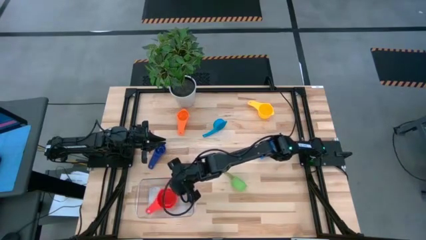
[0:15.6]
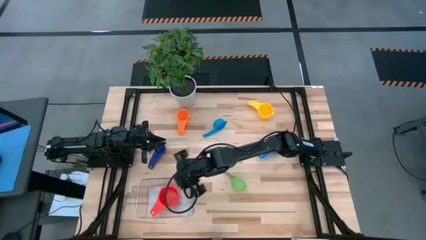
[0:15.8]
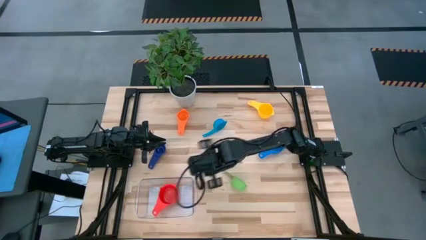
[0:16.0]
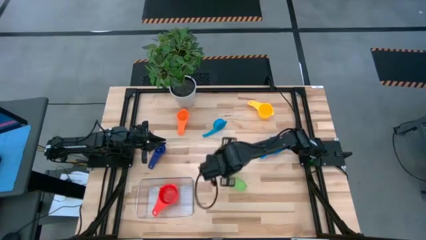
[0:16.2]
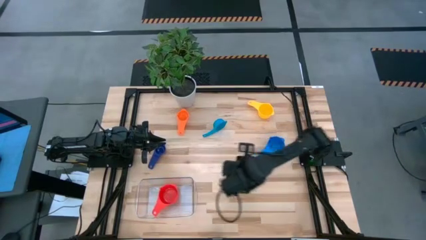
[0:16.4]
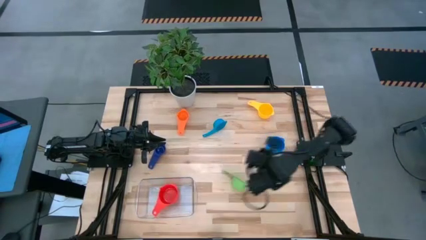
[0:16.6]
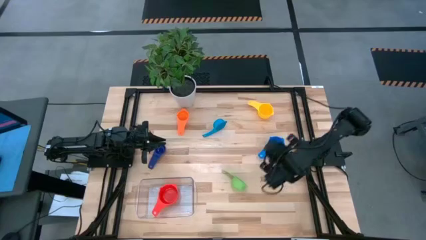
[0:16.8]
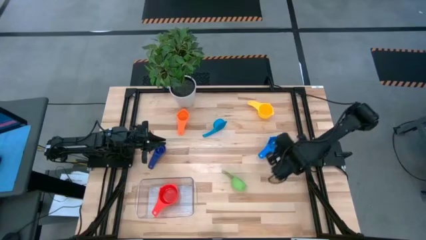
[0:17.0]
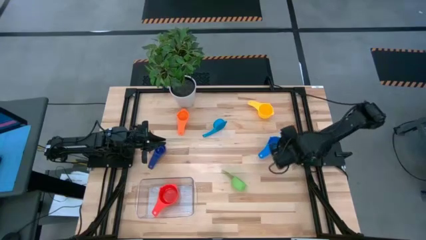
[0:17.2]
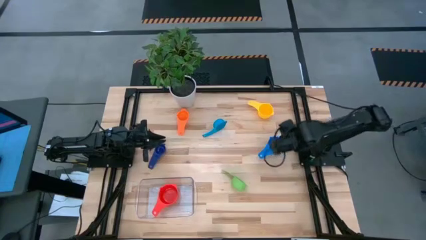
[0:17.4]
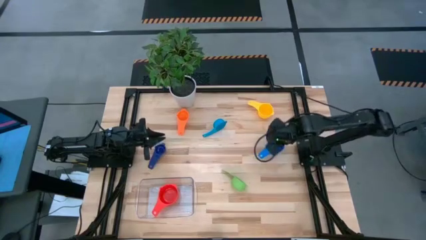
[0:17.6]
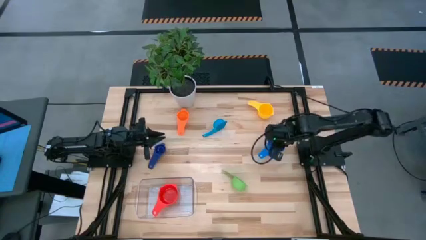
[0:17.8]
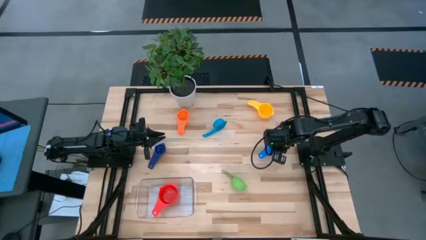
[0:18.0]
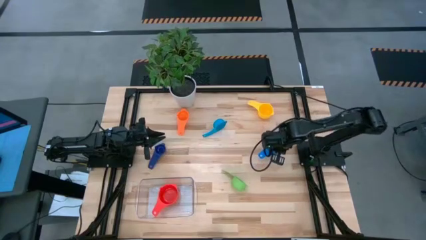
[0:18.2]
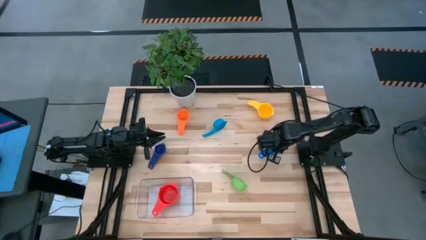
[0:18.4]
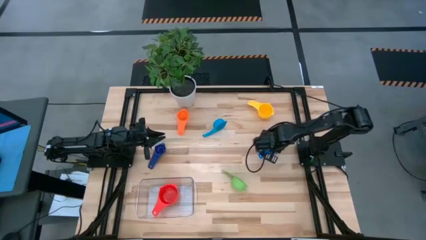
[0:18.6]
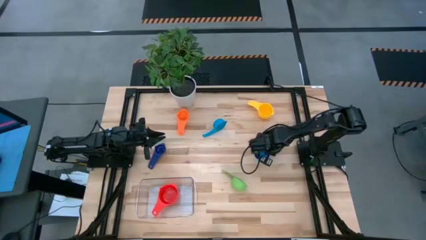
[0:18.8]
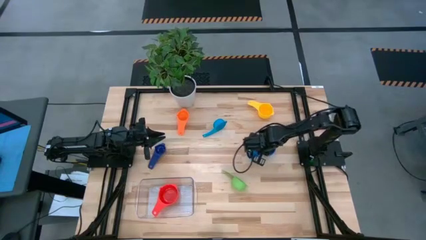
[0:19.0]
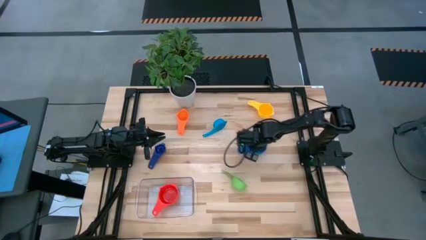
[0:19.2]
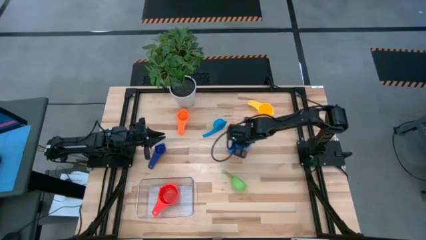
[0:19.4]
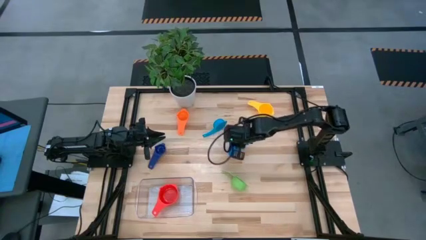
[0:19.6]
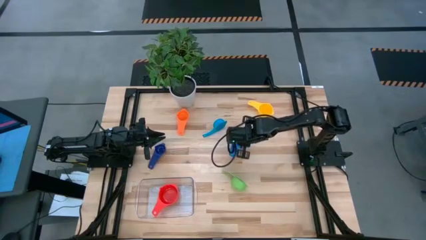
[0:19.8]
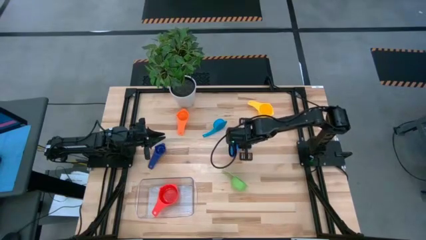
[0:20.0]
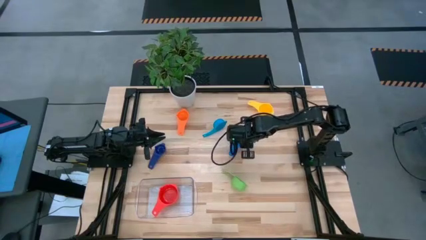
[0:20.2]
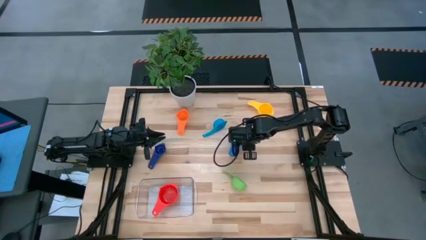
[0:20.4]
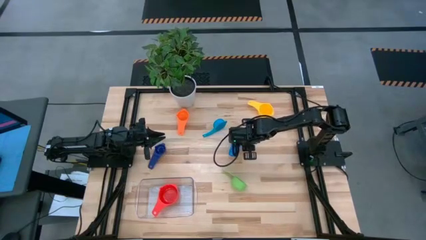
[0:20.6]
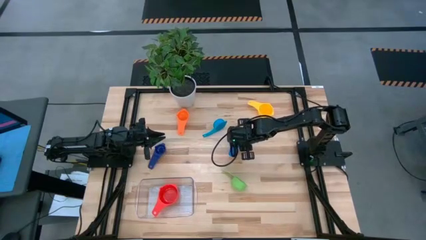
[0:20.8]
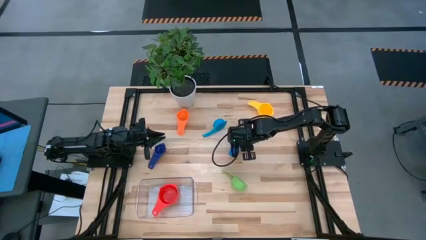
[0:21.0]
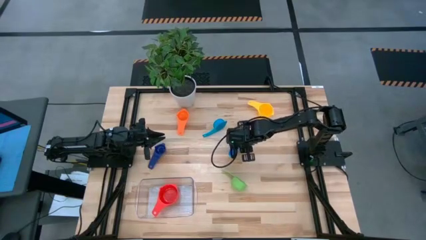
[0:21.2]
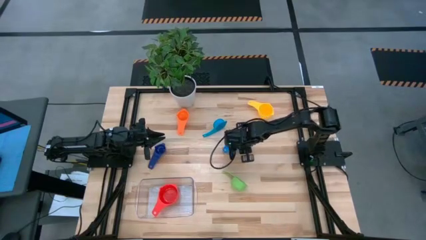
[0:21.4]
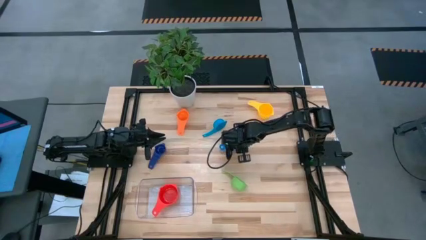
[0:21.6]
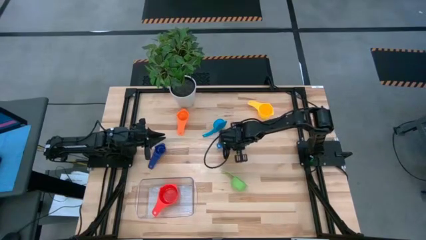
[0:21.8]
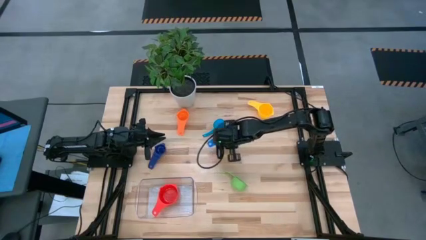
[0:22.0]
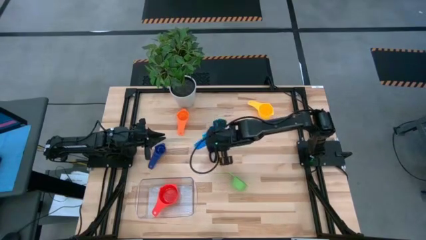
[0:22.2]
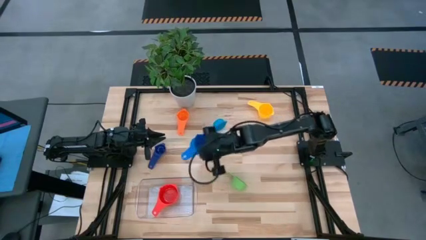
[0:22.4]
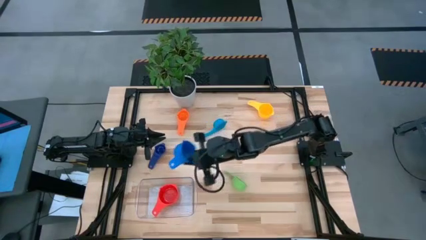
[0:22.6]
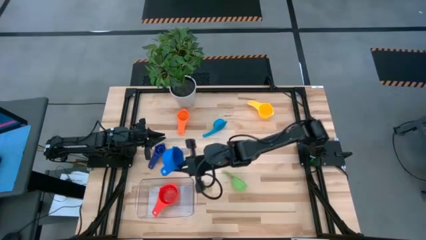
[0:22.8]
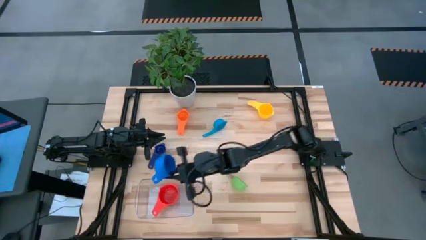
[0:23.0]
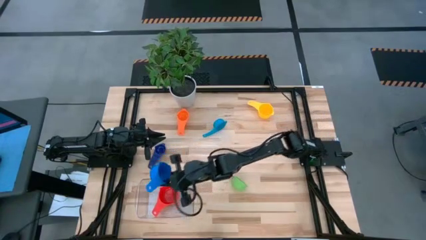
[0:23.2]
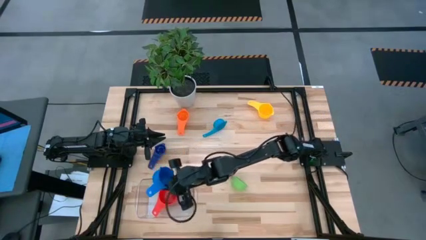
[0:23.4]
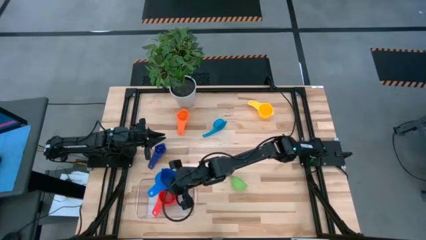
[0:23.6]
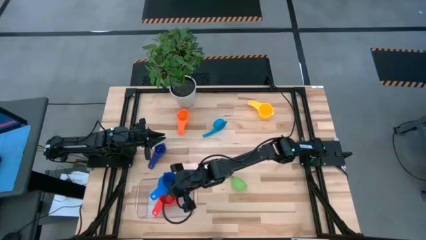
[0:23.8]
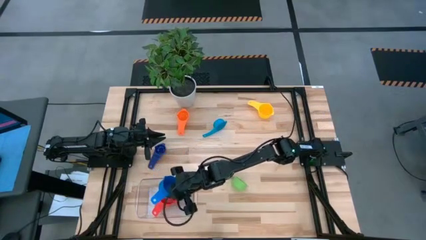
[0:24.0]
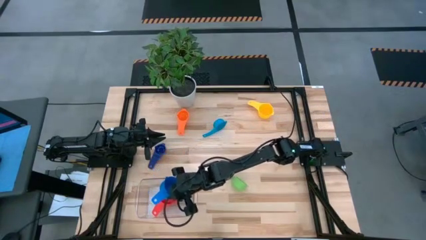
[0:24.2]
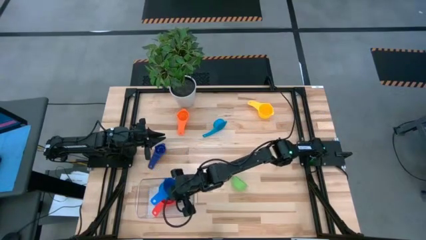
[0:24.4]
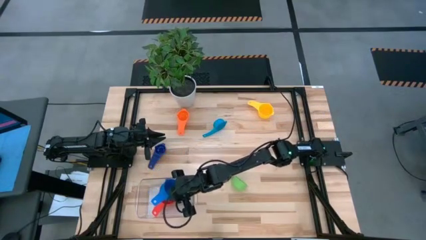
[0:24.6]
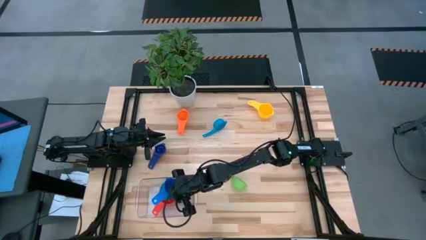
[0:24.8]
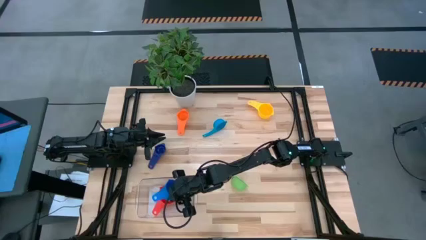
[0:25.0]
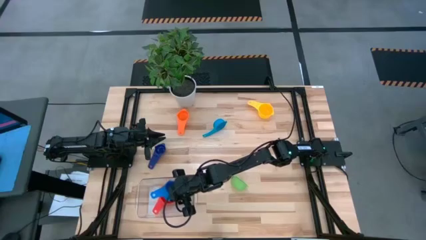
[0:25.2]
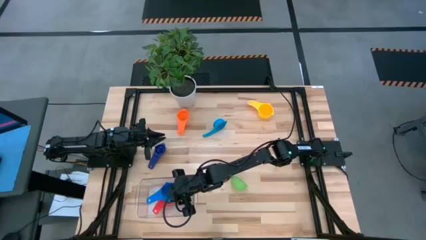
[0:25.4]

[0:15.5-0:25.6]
Task: Nest measuring cups in basket
Stack the blue measuring cup on top of the red measuring cup
